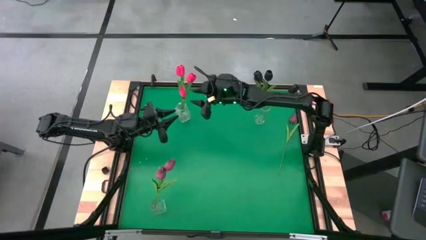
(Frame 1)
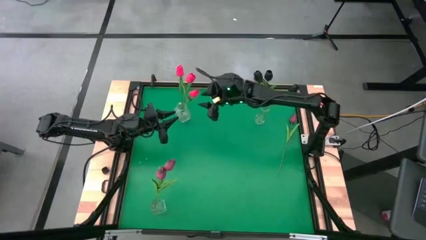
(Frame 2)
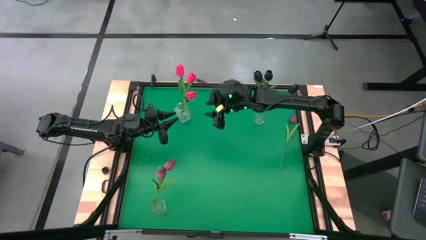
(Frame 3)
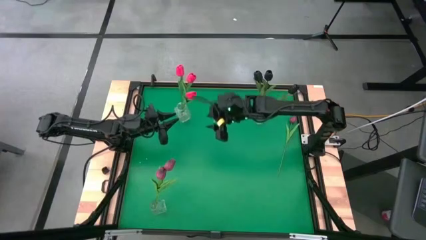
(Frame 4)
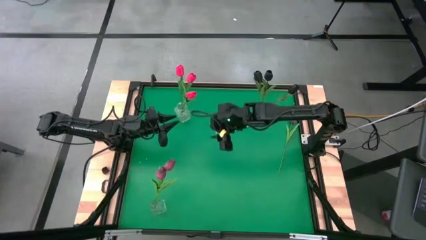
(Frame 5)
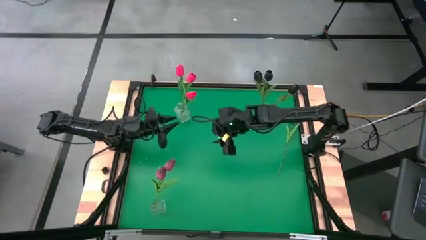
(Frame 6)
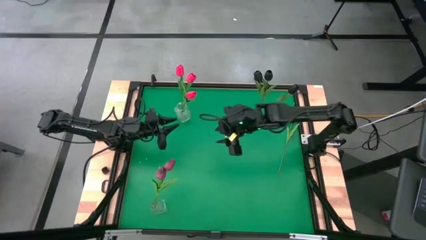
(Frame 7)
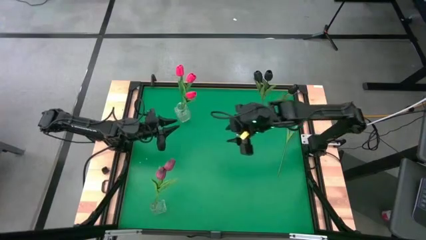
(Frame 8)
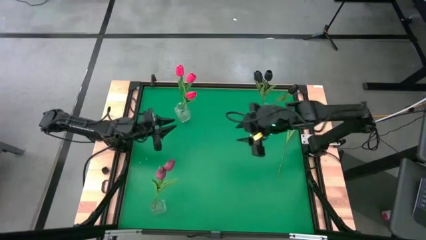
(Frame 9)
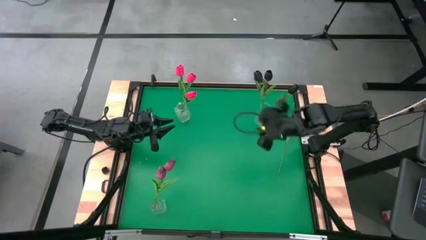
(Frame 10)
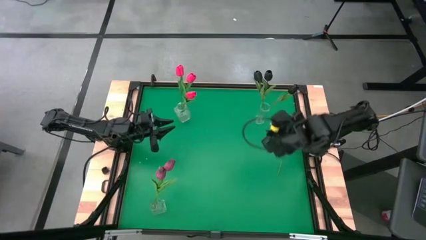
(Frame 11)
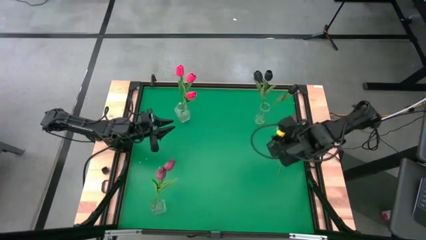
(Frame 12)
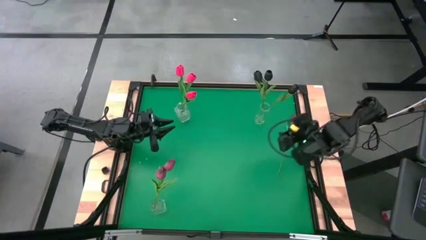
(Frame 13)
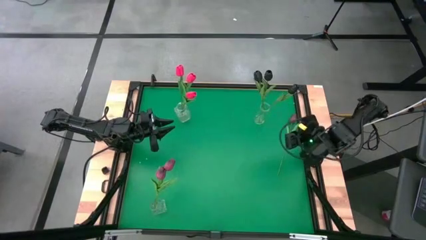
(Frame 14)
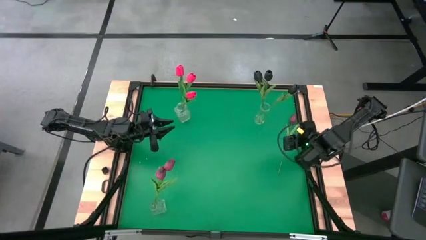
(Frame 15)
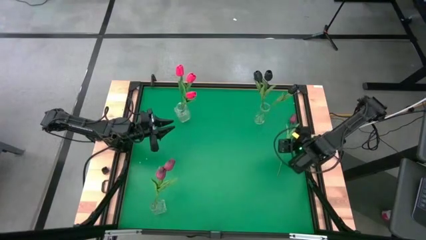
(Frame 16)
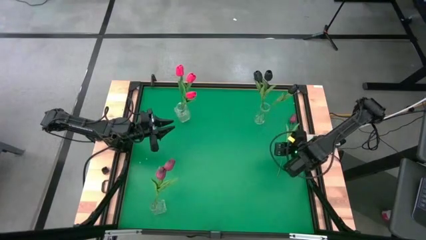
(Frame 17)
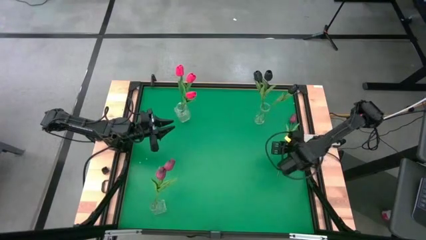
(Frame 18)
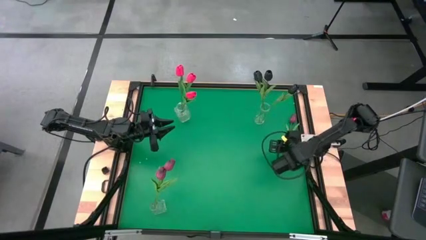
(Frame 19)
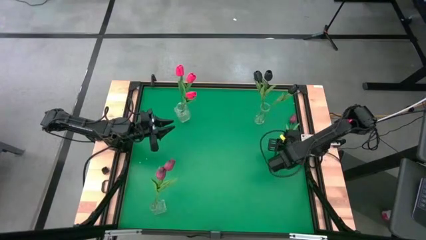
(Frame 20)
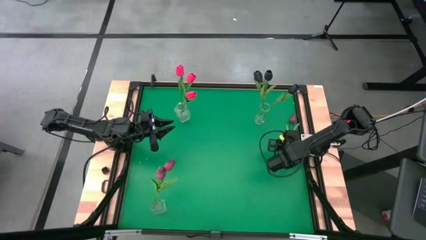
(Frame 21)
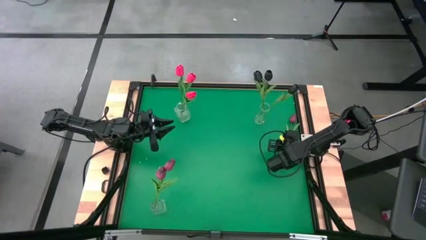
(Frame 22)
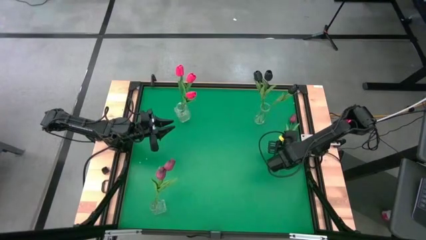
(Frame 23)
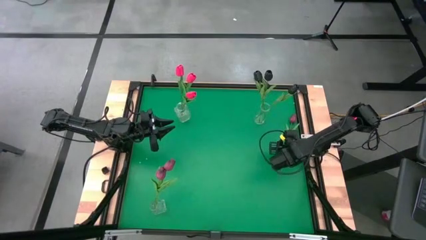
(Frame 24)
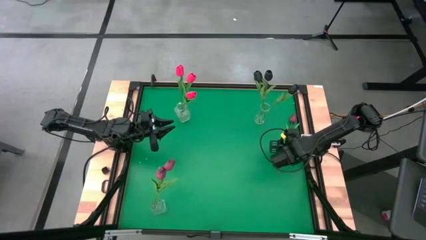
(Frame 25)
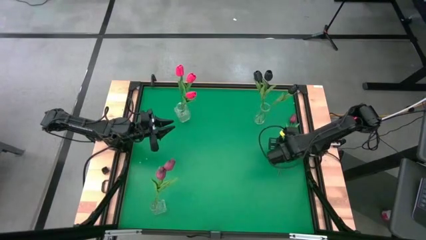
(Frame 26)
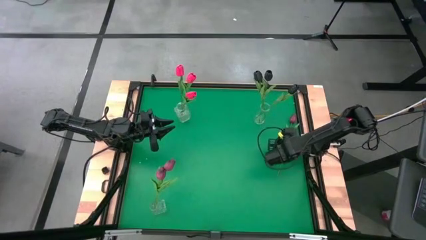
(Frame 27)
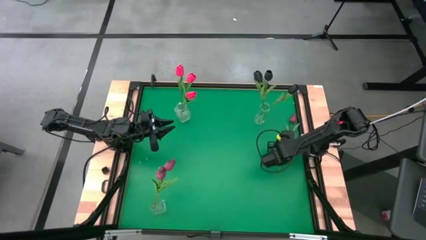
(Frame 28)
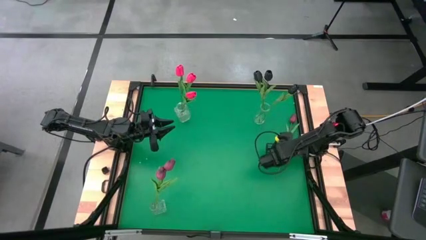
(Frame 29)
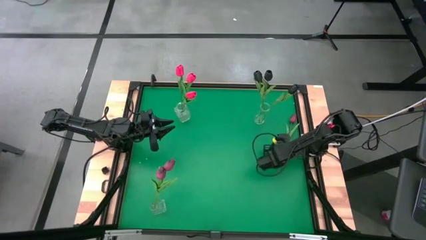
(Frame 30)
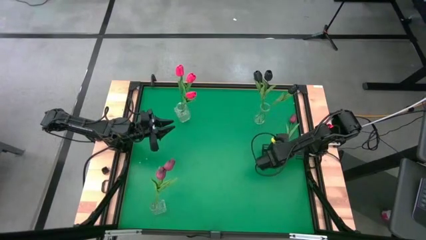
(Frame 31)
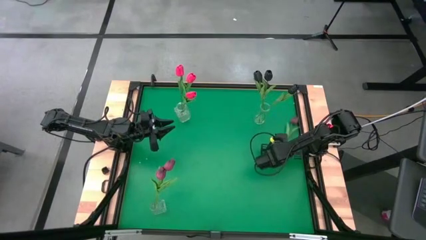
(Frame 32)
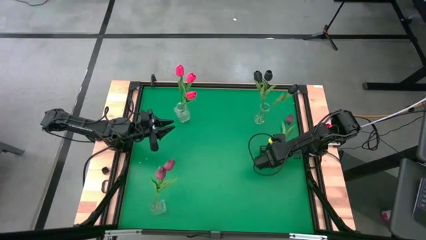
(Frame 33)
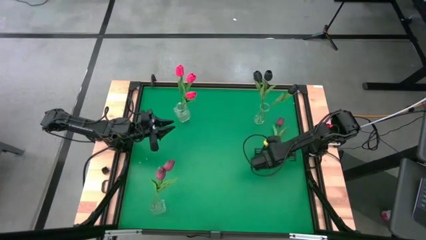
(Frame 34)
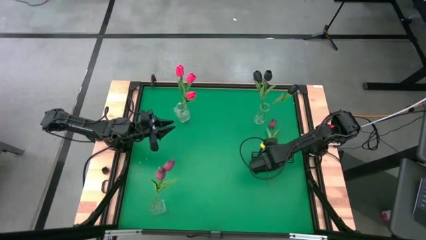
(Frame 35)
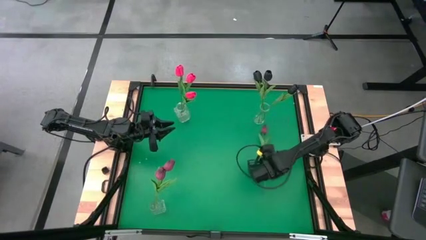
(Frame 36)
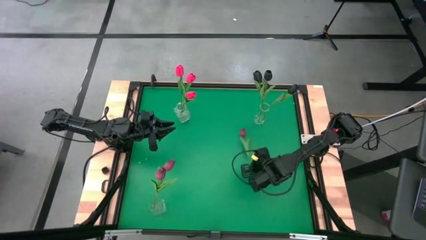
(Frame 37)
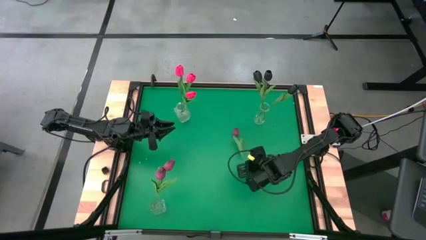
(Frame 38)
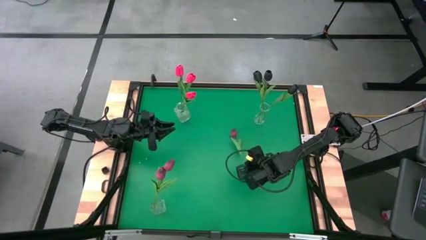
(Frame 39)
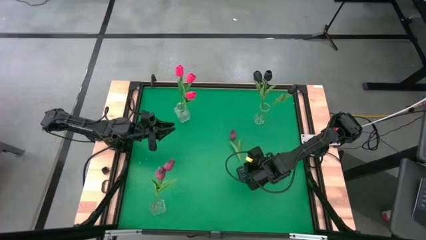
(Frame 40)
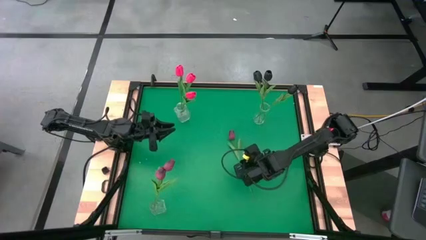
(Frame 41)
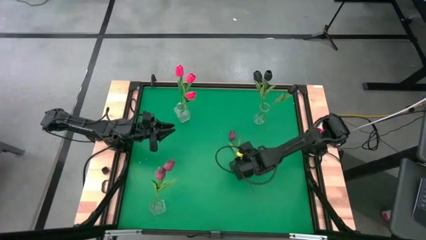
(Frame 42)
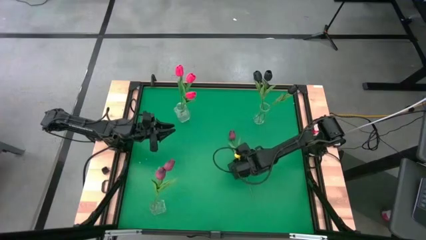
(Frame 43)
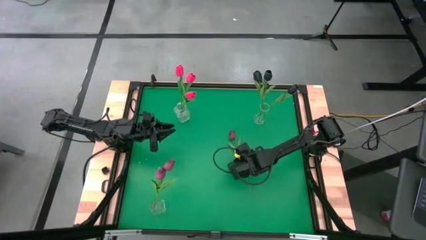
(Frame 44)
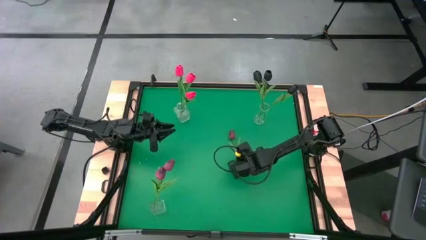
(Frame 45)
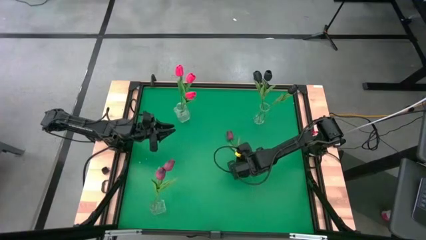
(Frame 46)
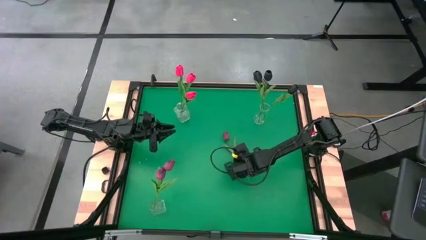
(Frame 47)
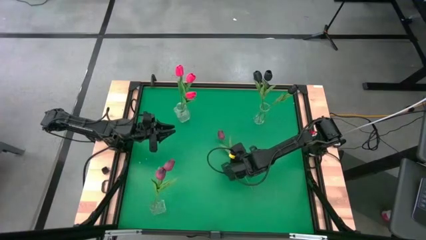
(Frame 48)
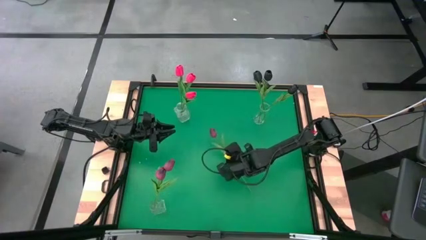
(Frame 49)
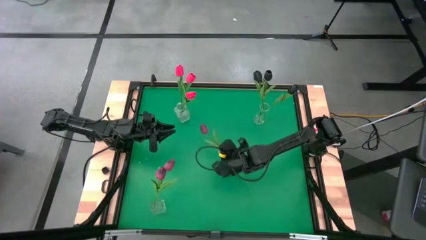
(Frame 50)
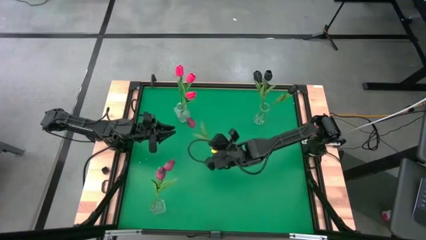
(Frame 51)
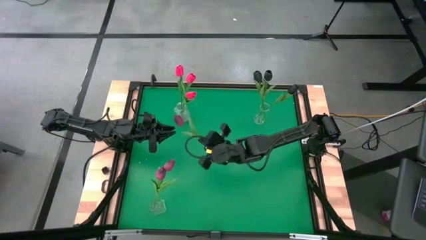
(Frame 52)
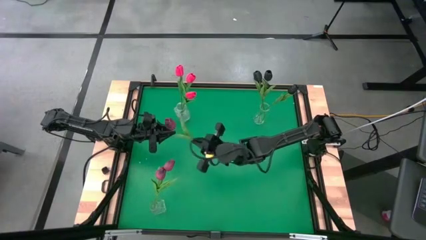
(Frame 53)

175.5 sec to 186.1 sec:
Task: Sort flowers into vase by color
Put the dark red flower into the bottom transparent flower vase
